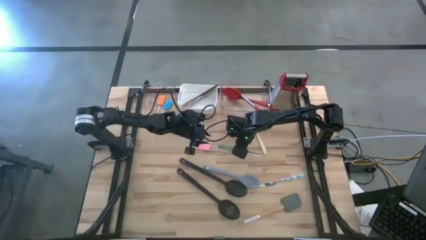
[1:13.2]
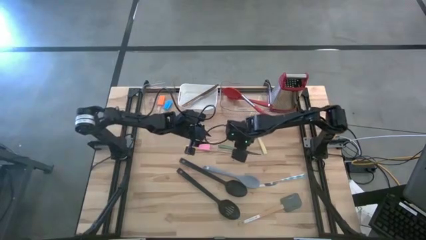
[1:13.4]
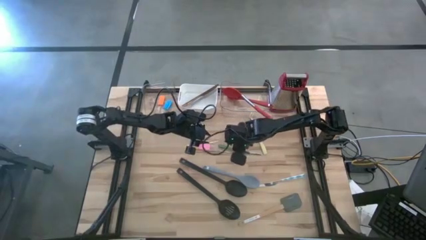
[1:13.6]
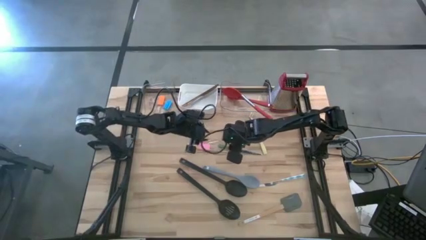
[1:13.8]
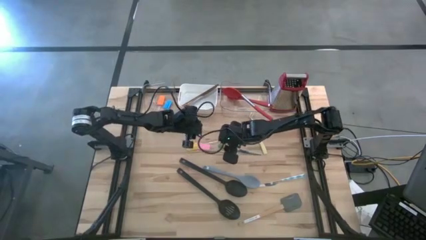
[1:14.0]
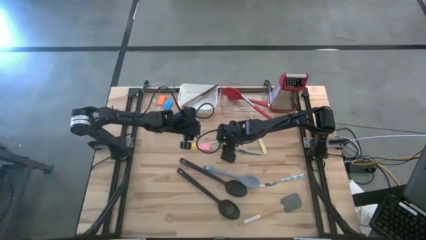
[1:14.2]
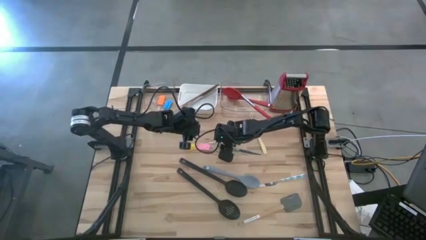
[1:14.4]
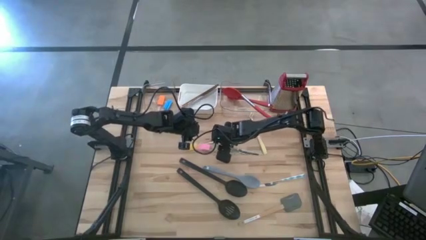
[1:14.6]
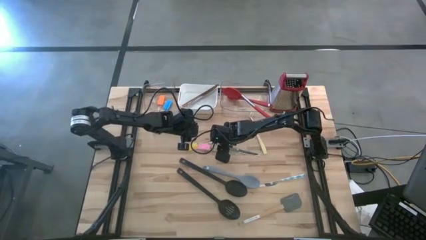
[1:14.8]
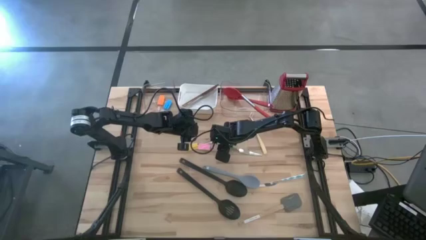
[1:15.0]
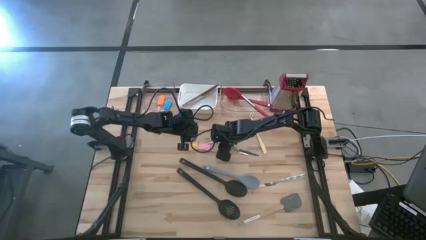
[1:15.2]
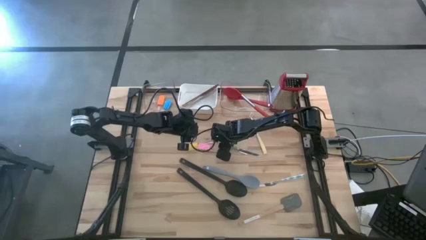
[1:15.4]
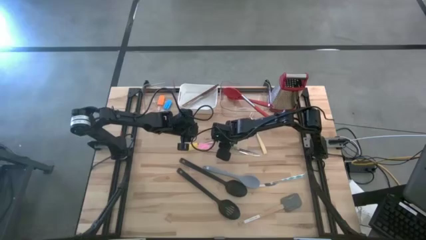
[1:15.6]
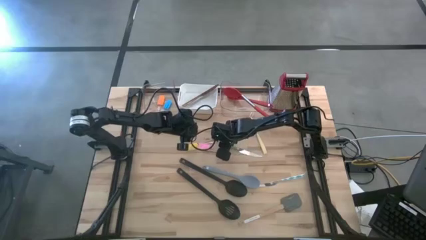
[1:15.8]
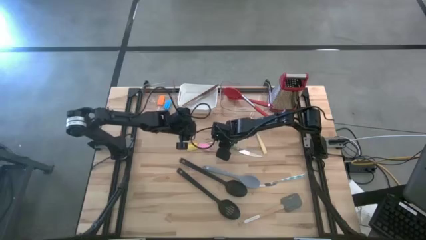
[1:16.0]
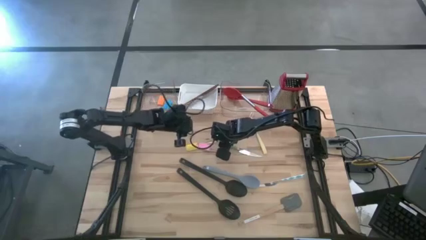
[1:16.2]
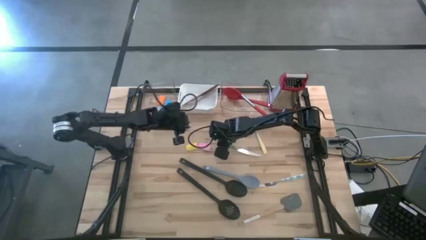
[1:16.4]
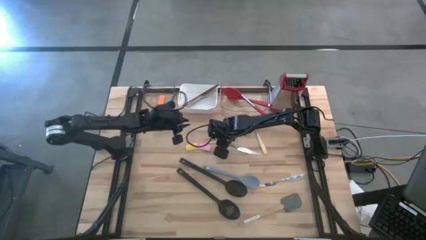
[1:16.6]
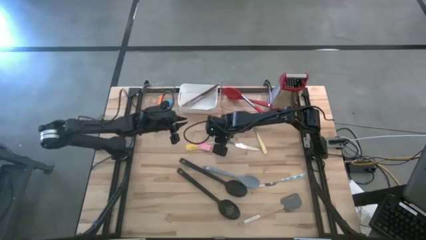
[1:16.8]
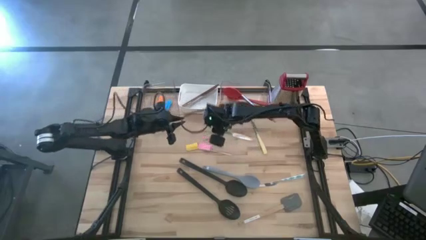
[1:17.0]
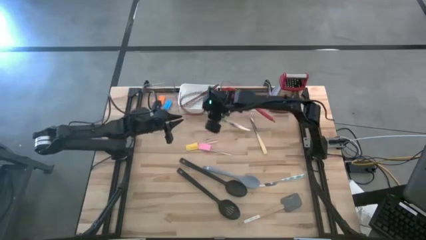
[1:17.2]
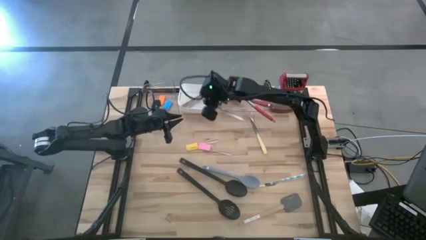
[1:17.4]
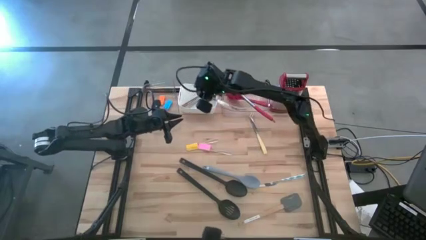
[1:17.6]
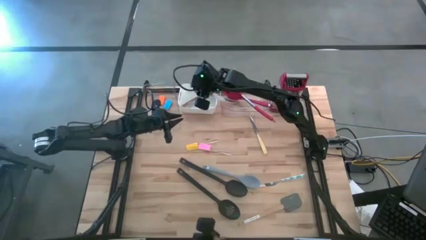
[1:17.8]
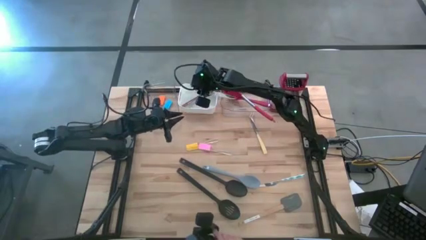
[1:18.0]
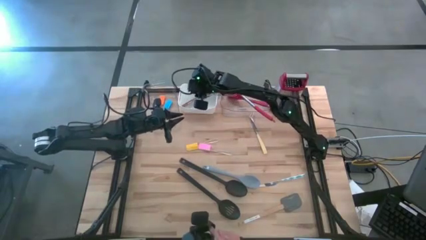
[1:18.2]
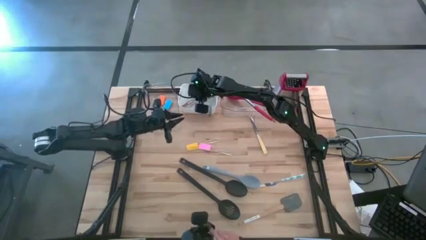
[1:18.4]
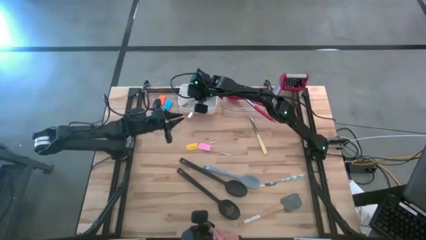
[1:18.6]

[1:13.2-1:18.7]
Task: Pick & Place Kitchen Items
Put the green knife into the white bin

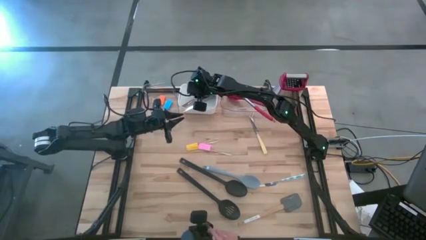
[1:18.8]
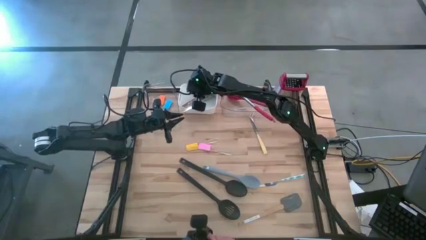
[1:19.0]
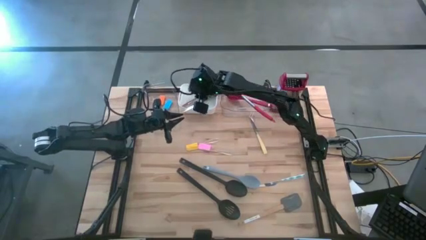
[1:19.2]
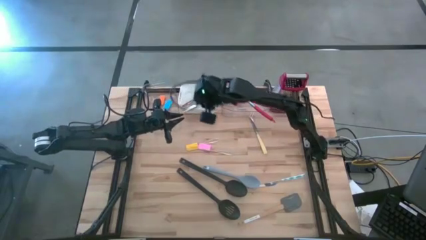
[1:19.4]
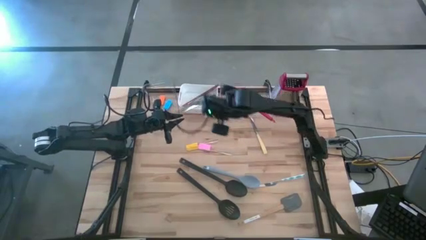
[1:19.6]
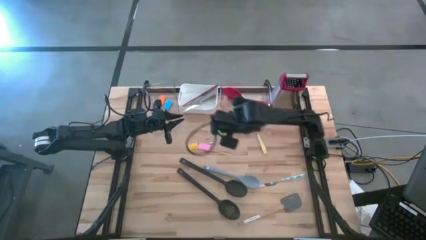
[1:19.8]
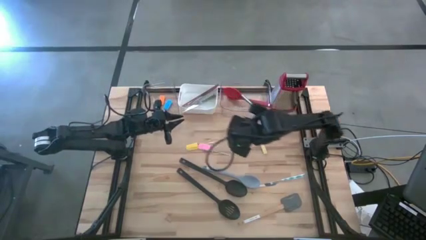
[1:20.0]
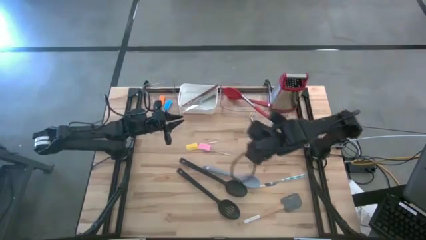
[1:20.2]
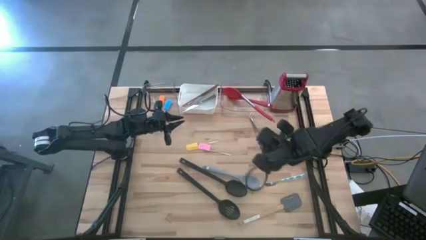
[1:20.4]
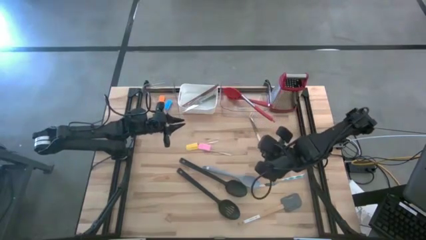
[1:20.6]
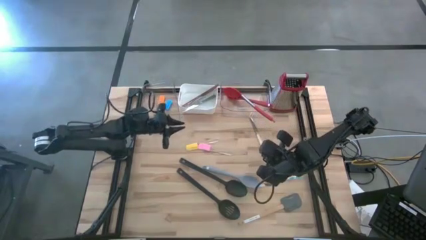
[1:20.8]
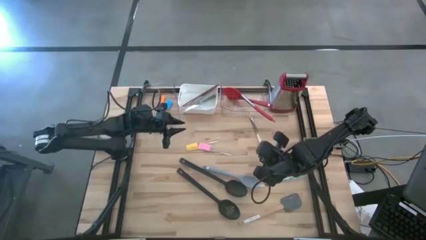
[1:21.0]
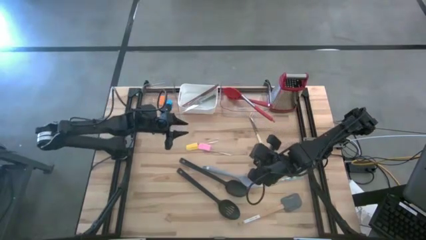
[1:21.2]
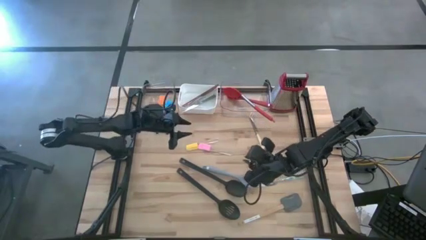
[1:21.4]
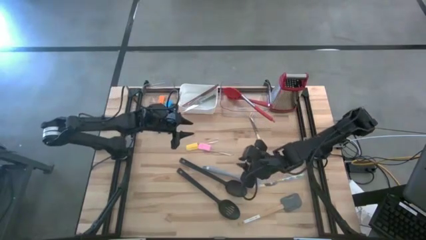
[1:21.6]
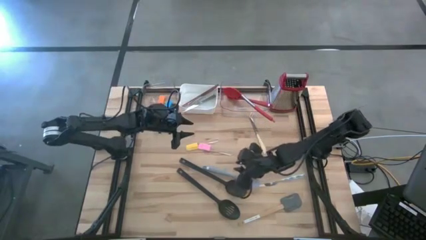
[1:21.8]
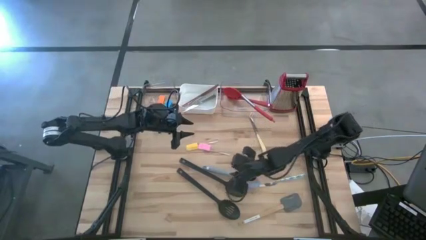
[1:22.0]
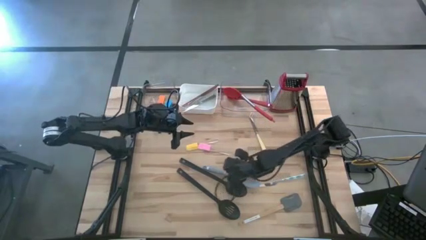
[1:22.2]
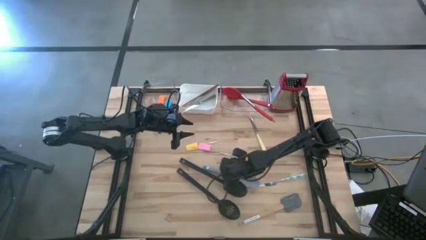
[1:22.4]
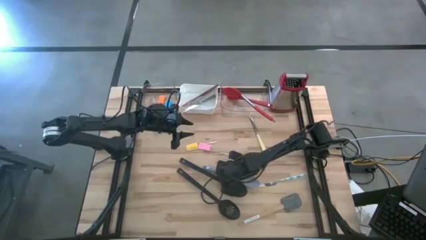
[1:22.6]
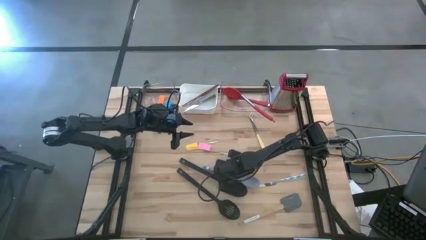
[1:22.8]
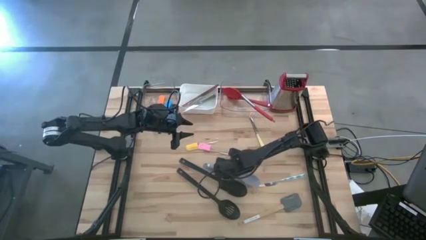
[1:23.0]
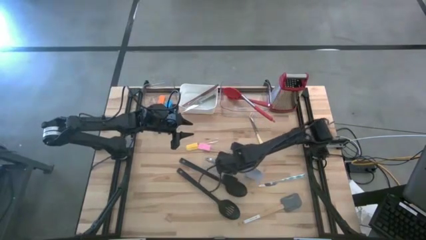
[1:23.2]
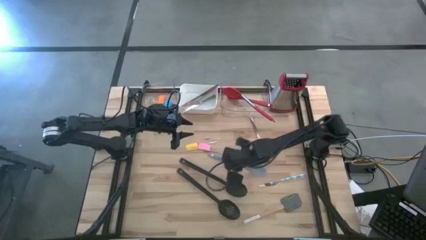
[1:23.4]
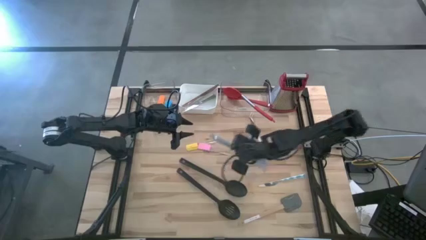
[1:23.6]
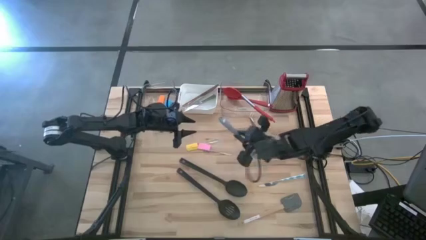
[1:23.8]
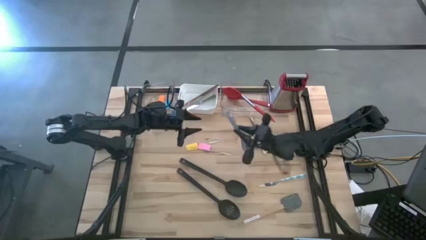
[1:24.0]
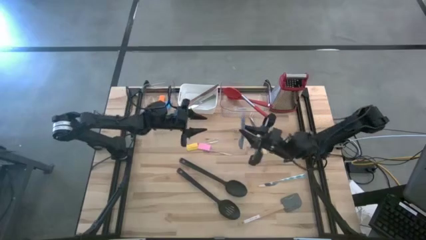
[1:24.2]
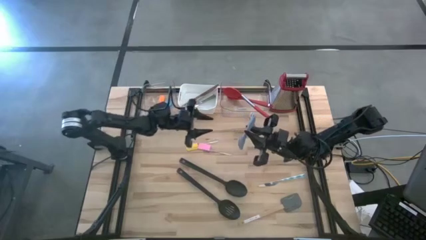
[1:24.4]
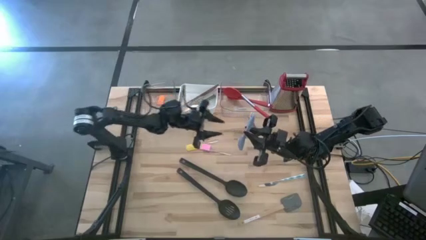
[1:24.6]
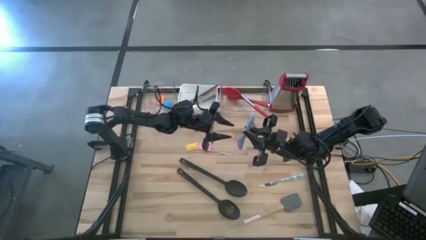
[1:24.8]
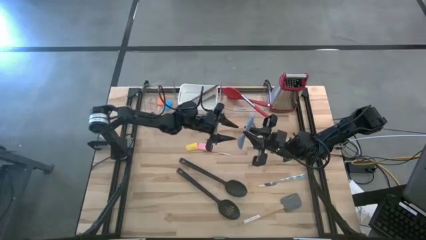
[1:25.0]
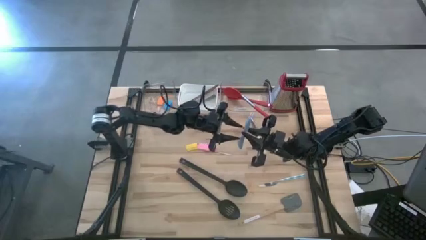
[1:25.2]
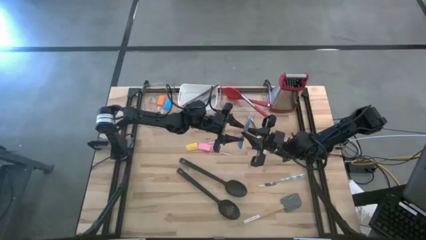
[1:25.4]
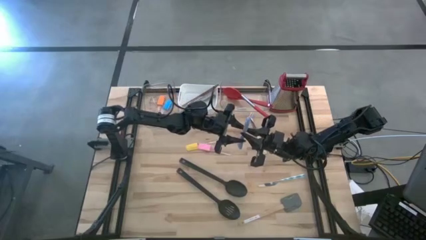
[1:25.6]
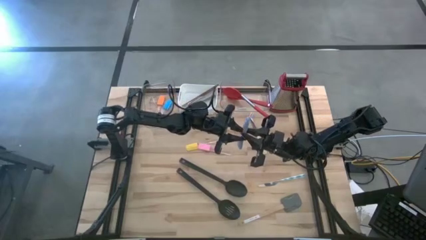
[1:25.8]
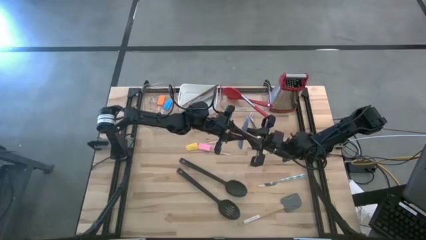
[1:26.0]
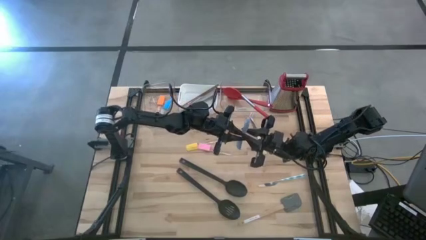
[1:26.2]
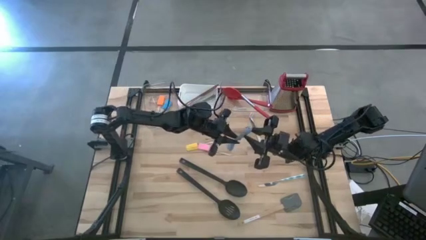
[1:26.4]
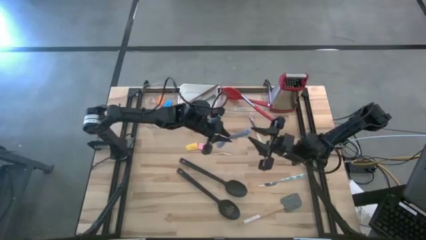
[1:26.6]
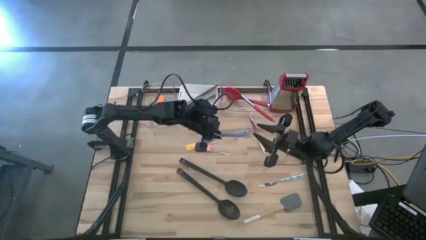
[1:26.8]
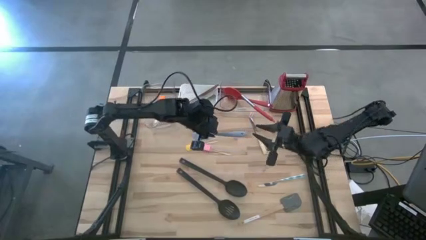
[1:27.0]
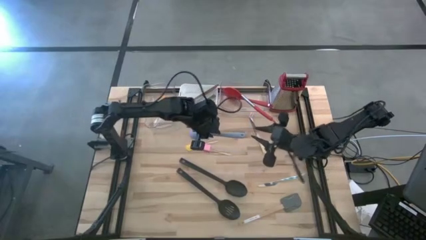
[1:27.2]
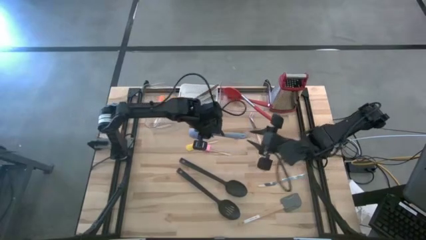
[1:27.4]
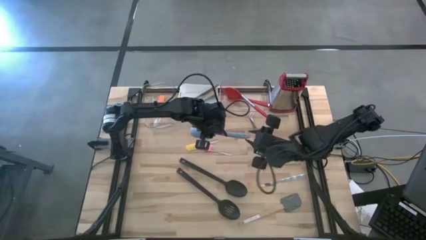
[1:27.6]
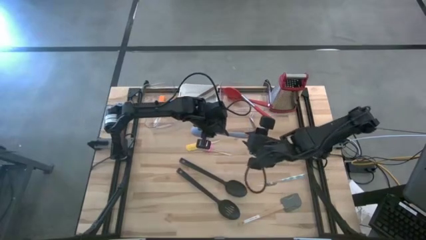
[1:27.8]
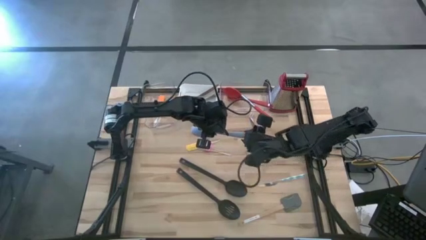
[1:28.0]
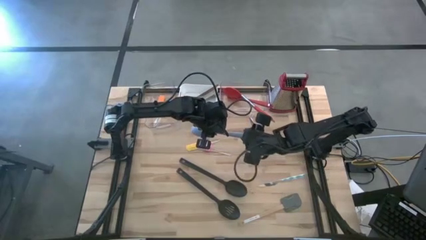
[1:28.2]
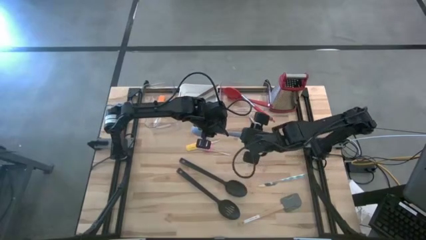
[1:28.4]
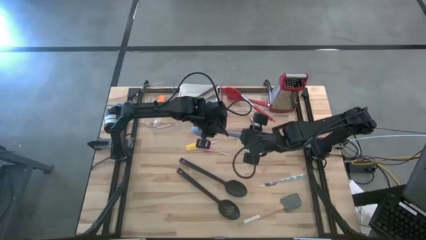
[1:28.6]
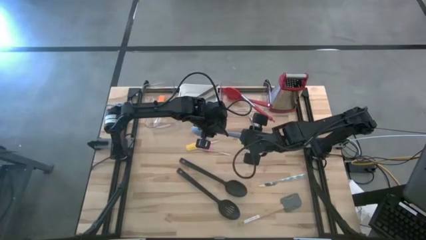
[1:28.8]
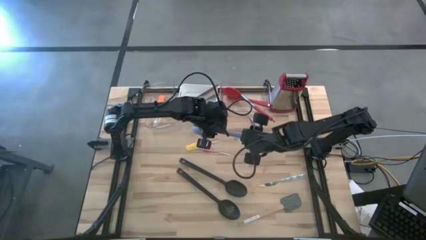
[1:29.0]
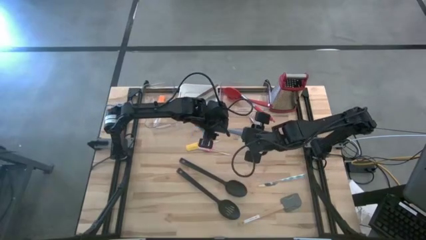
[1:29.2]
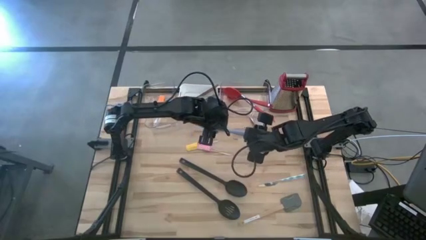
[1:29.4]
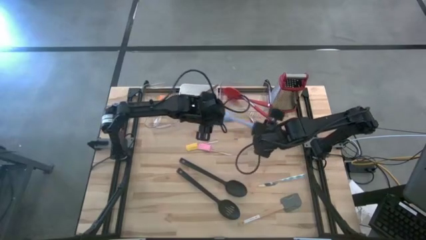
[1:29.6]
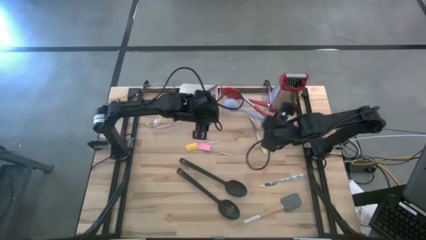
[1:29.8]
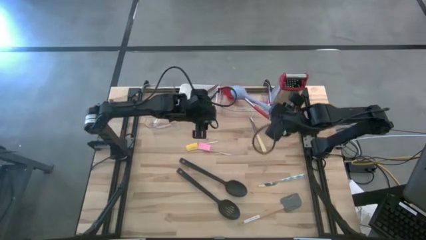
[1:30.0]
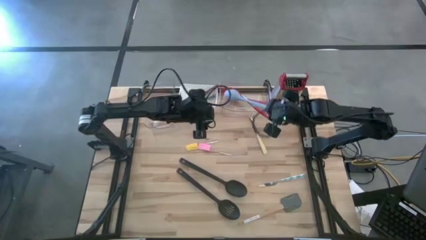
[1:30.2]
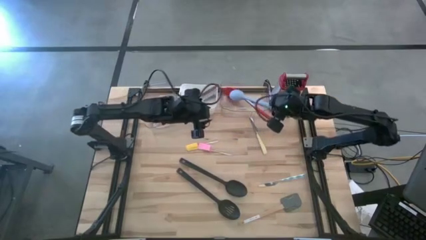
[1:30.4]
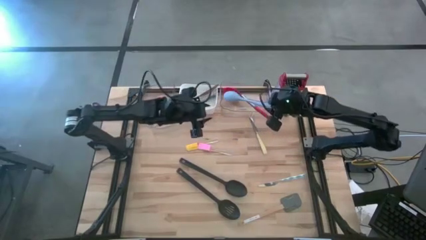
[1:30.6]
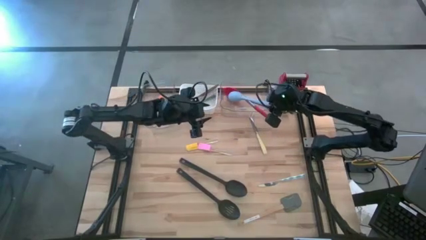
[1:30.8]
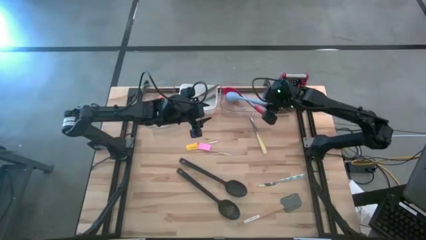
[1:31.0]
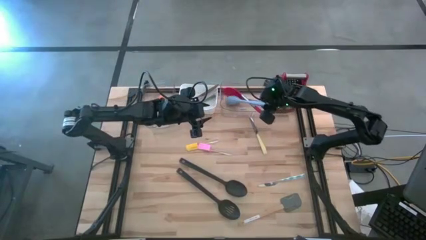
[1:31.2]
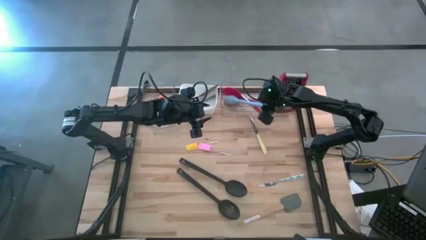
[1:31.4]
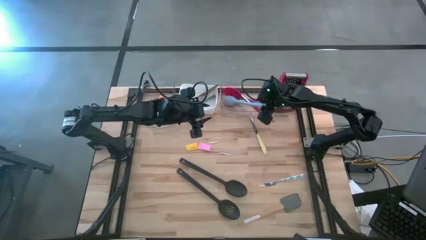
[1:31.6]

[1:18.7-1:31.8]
Put the gray serving spoon into the right transparent bin
